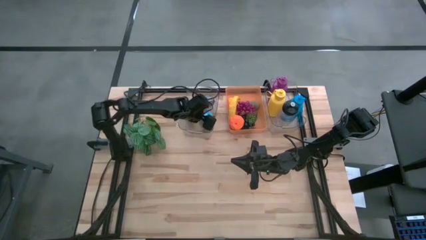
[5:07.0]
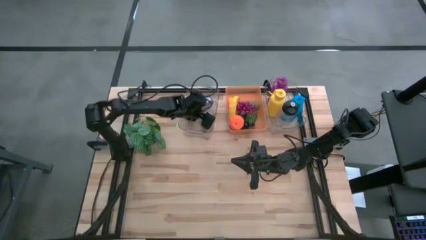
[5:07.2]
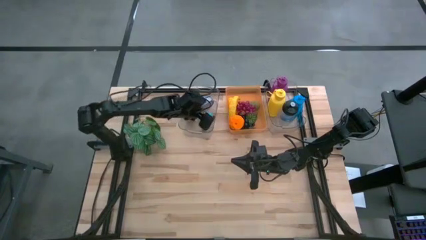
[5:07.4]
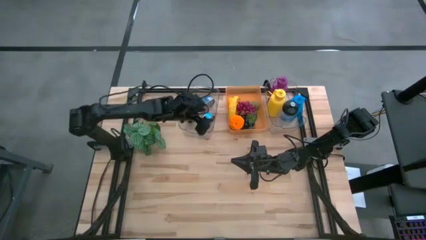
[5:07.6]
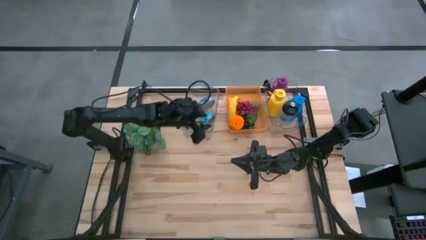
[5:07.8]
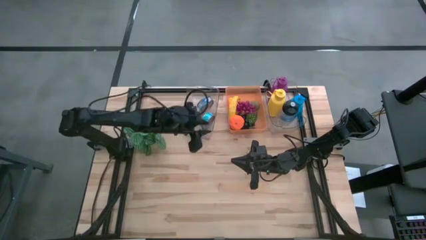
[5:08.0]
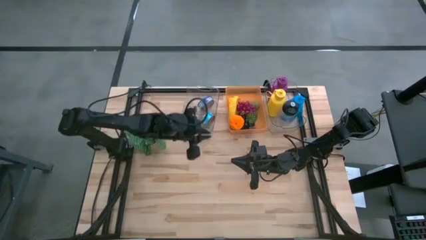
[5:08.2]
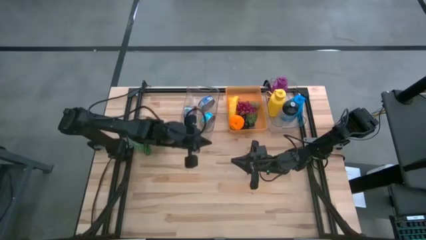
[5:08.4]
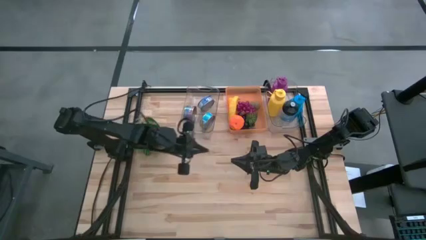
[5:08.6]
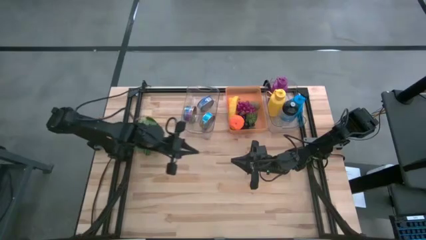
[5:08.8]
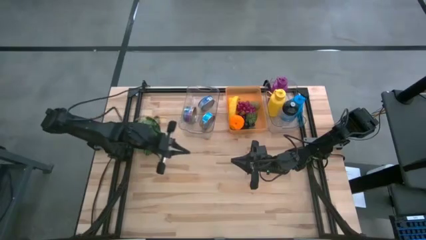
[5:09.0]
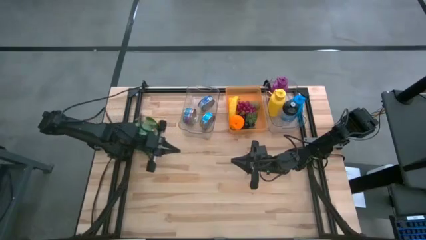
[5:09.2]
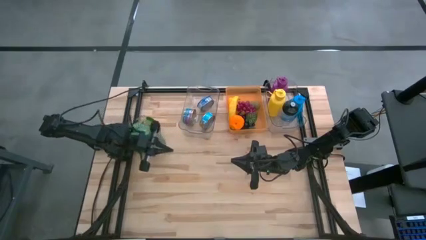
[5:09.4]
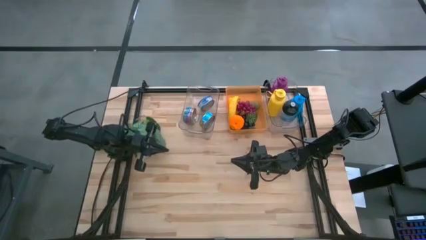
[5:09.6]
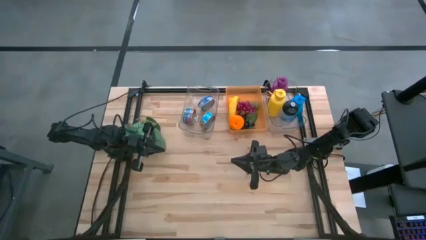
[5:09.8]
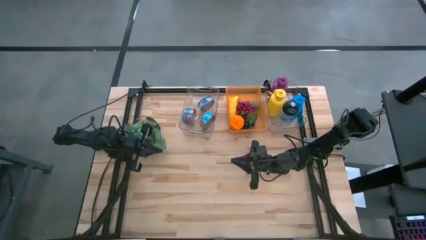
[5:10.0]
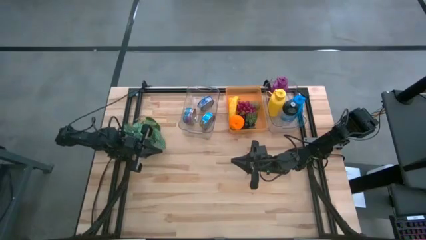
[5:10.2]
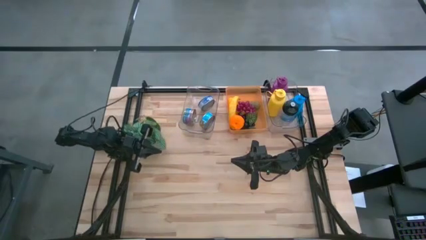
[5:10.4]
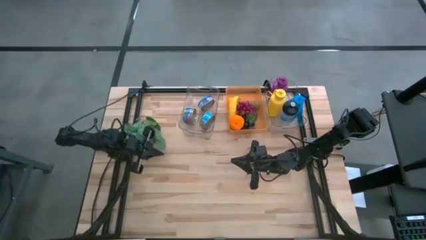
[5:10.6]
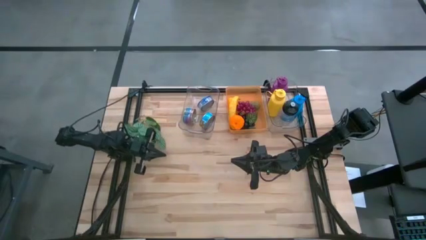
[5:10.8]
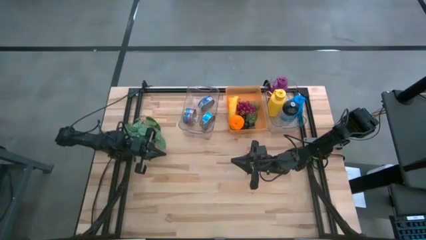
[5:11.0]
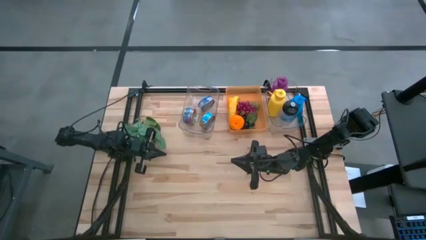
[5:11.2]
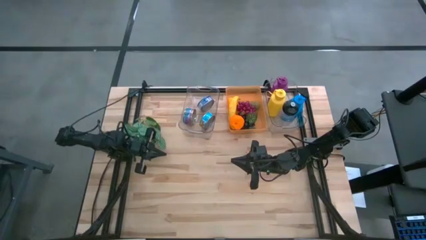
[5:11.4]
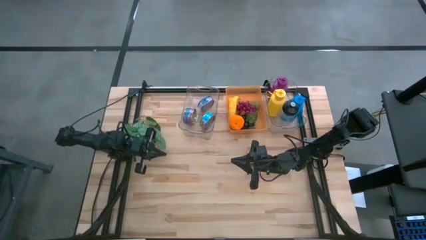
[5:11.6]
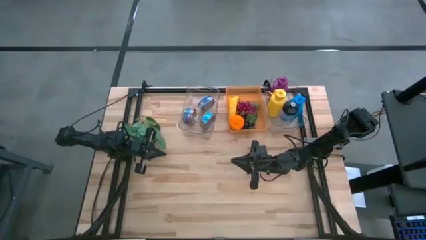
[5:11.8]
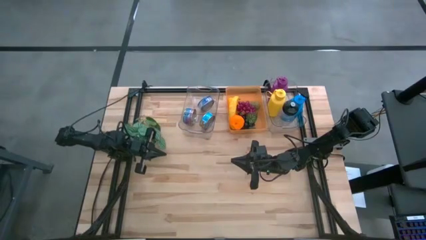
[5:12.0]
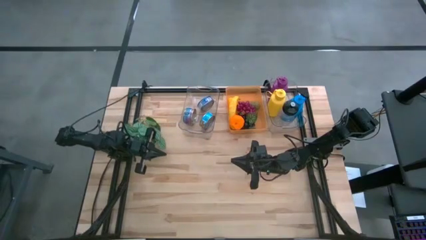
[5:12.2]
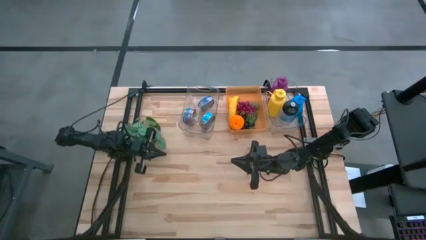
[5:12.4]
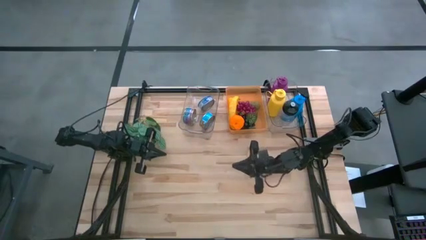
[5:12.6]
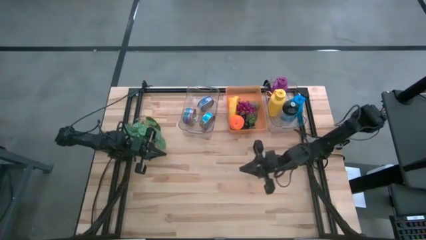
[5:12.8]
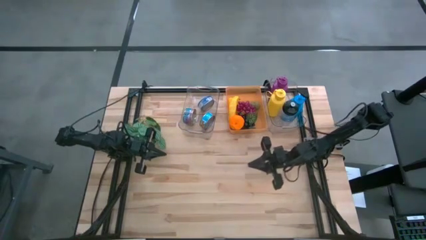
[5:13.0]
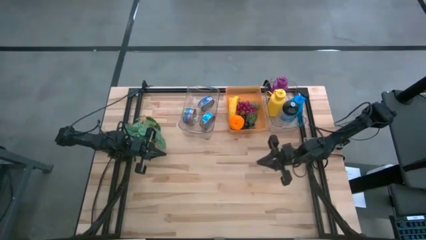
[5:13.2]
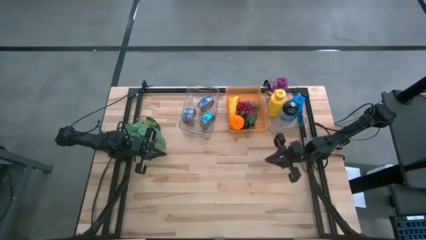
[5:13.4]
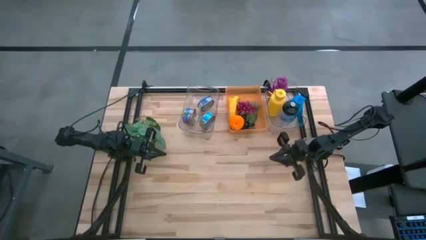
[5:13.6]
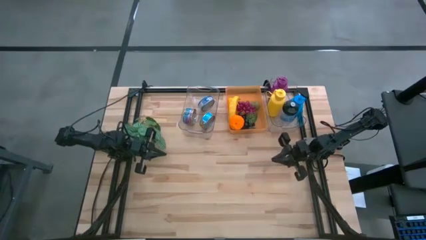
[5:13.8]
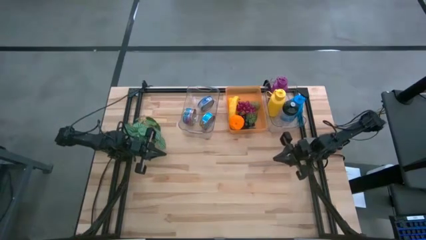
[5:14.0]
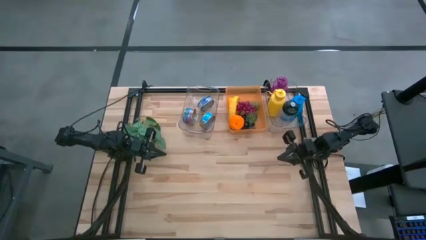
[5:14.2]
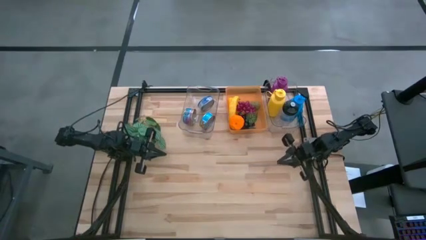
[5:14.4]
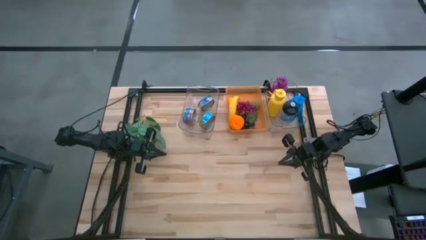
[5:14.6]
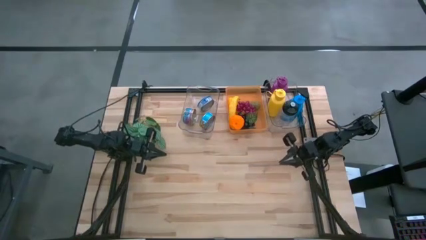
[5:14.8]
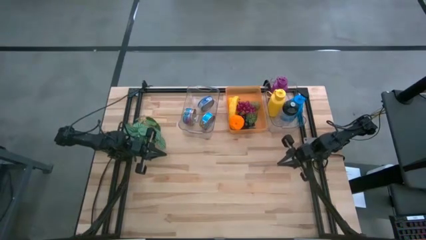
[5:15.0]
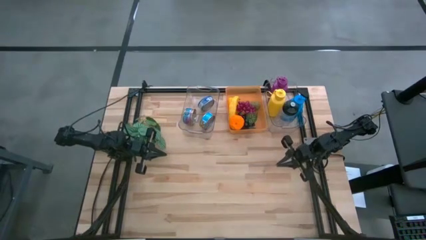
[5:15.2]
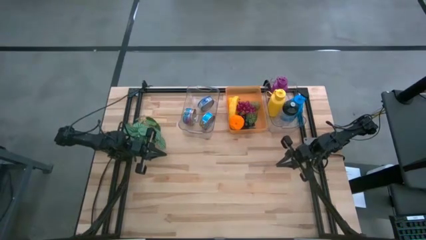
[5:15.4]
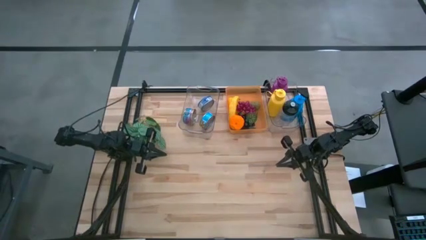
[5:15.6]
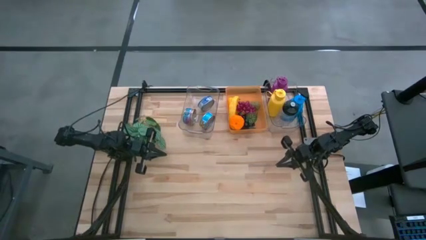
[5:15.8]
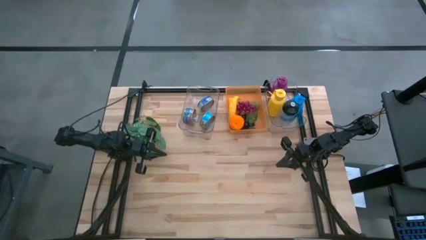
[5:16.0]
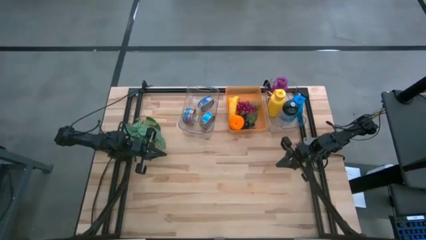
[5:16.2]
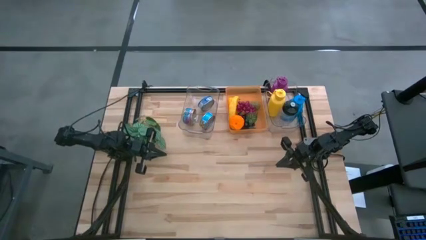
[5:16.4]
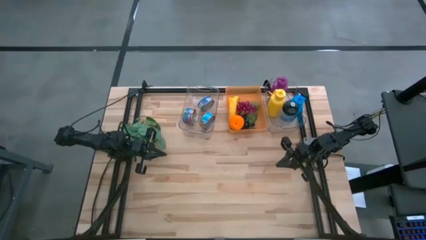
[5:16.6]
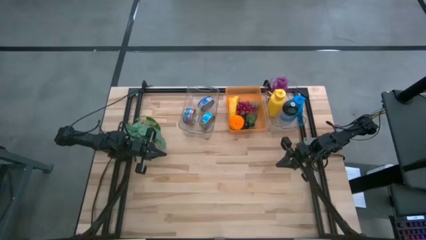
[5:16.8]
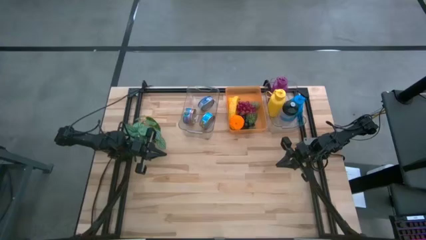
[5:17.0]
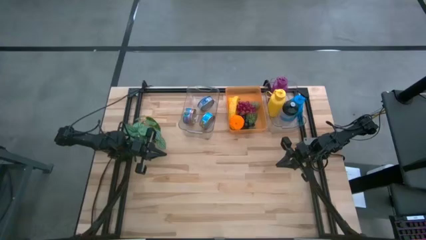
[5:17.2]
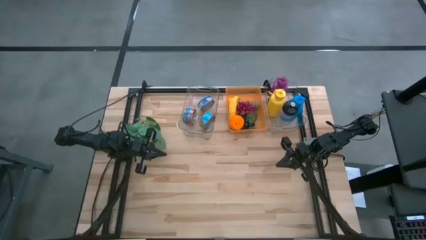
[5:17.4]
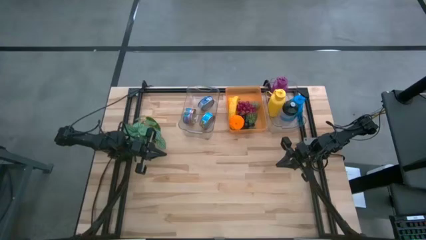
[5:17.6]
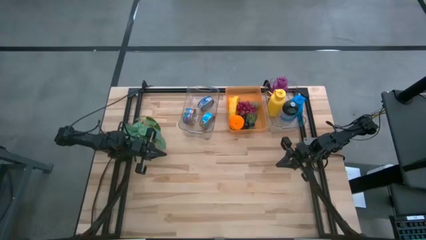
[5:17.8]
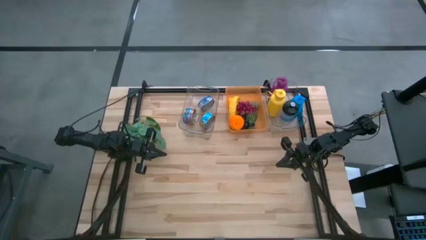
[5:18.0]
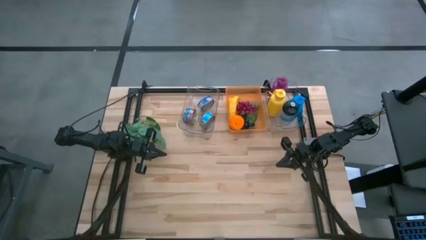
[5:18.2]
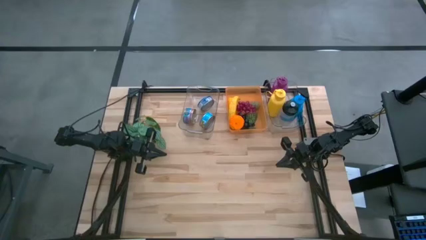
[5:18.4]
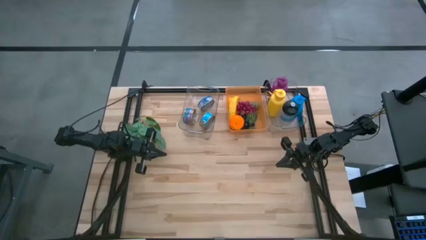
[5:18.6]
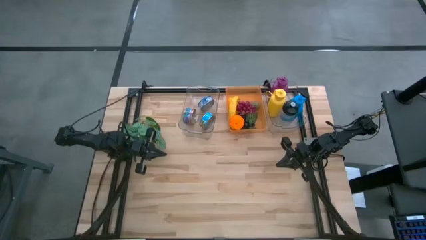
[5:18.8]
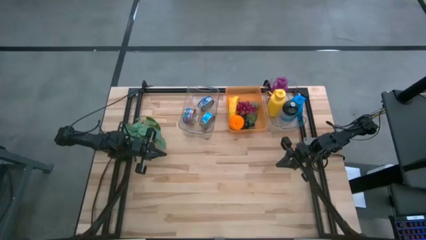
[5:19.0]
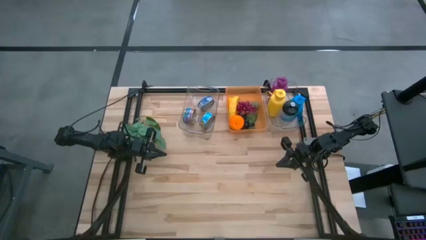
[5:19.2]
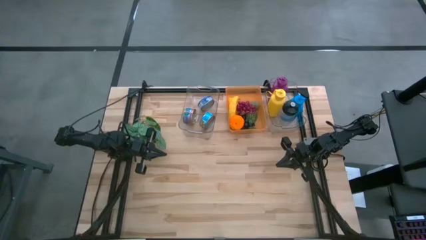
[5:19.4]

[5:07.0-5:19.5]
Task: Pick & Place Food Item
Return to Home Position

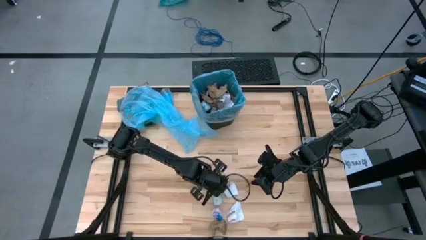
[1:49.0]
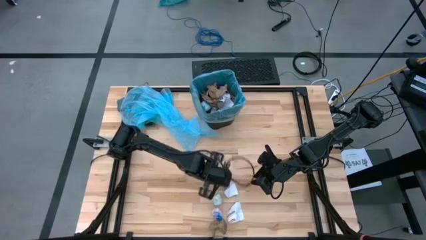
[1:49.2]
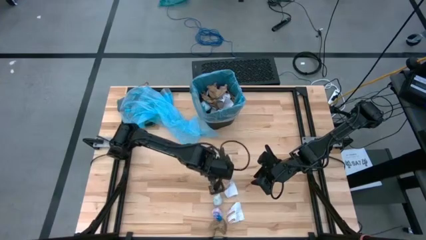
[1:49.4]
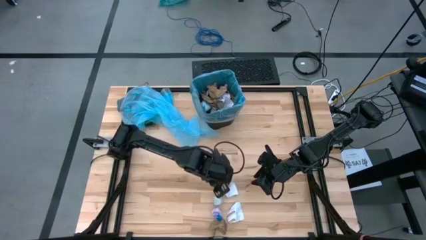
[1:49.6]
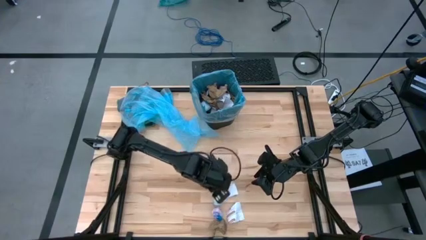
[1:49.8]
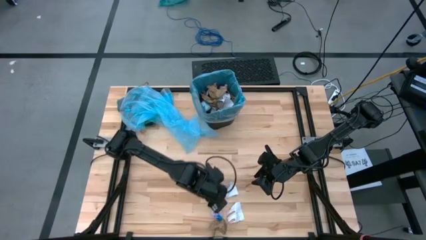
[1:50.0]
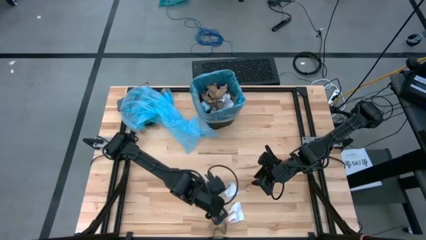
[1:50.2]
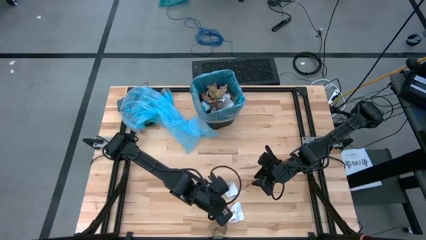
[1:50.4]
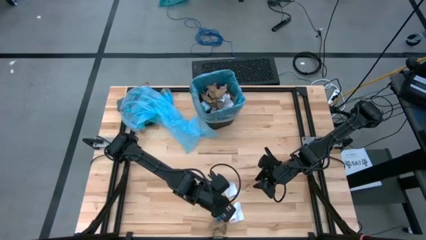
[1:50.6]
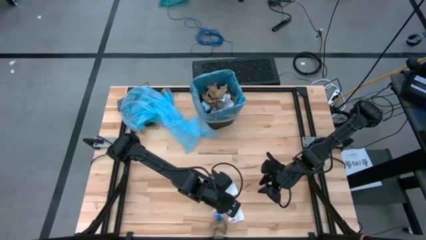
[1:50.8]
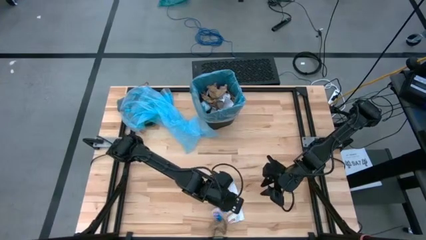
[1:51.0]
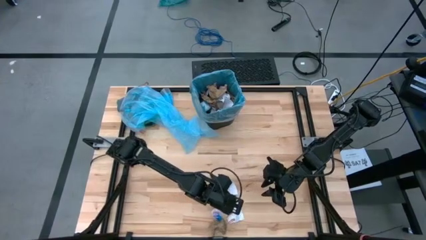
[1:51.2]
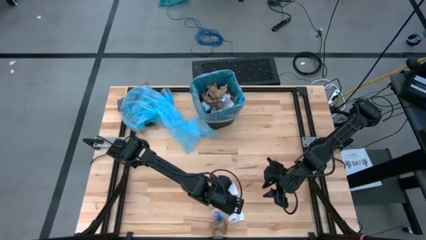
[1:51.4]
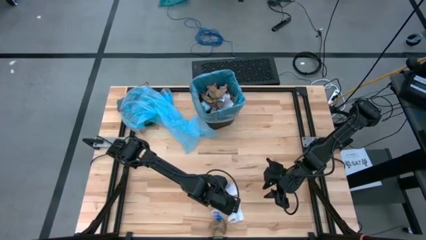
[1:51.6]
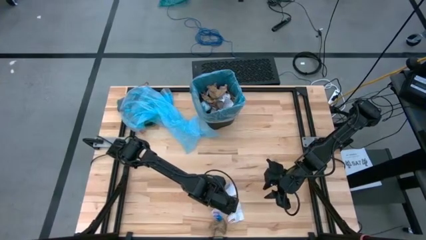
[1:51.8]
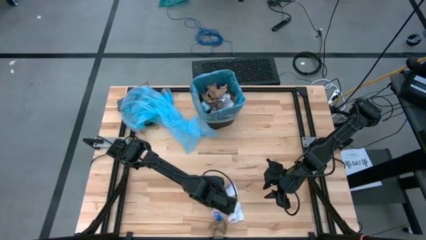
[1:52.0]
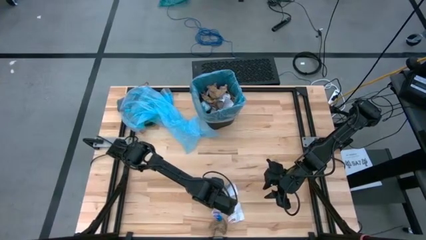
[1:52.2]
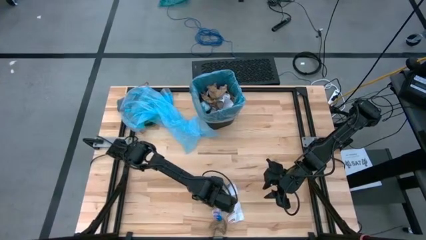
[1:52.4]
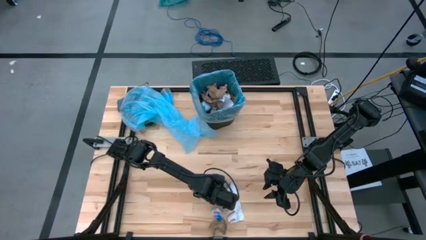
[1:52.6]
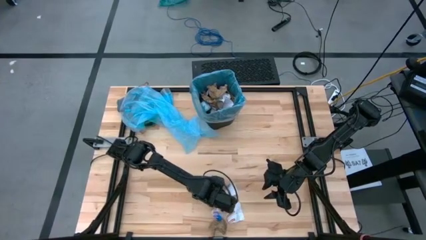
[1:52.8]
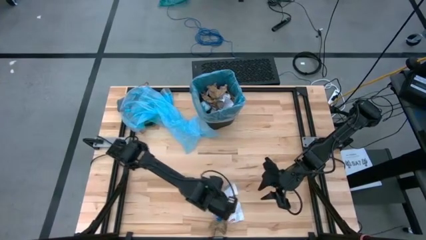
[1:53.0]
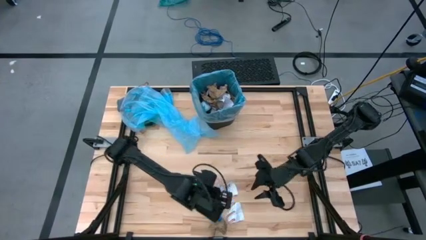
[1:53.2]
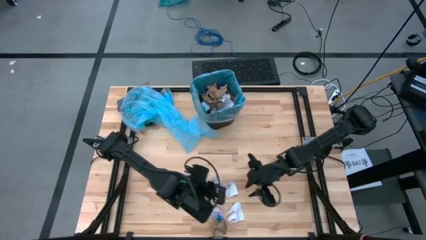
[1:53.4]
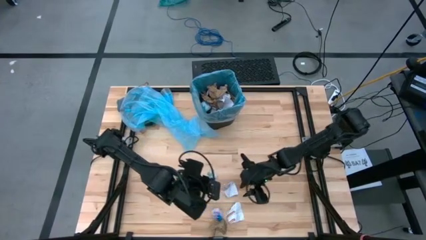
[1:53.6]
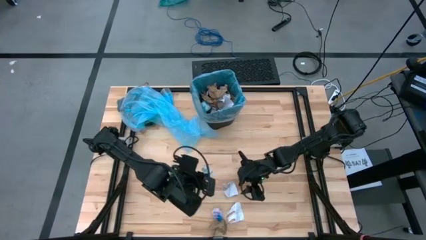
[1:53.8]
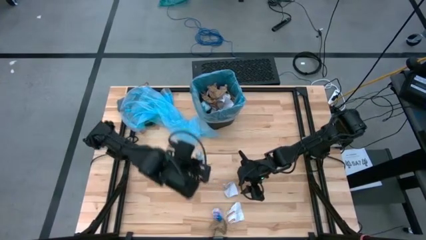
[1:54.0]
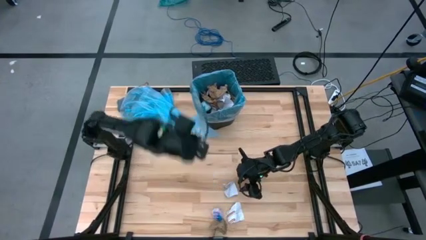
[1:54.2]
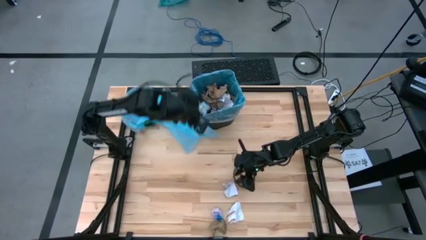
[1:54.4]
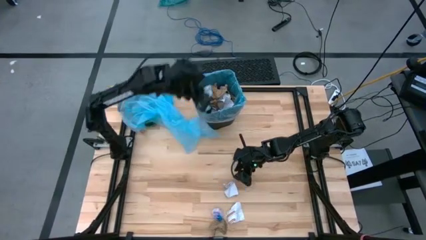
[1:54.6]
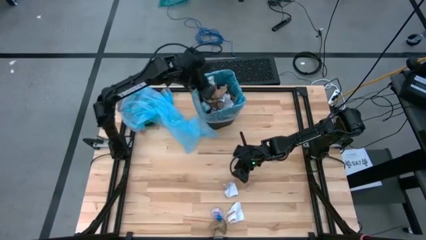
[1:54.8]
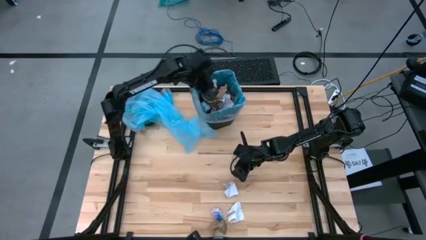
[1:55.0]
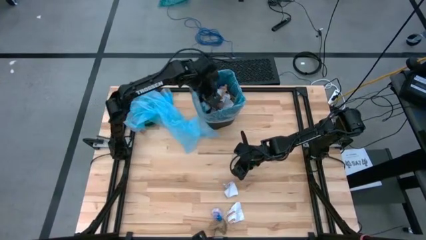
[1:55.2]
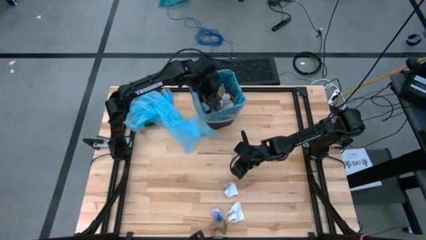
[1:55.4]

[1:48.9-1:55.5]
Task: place trash/remove bag and relplace
Put the blue crumpled plastic bag into the trash bin
